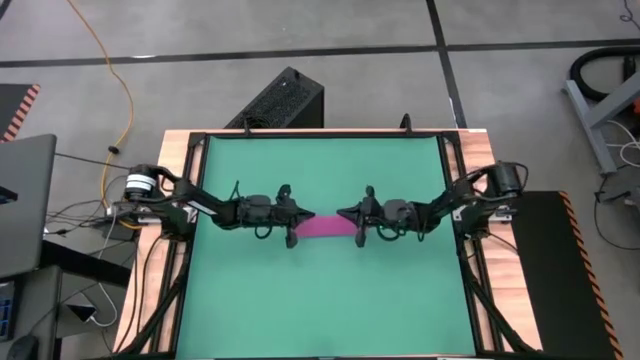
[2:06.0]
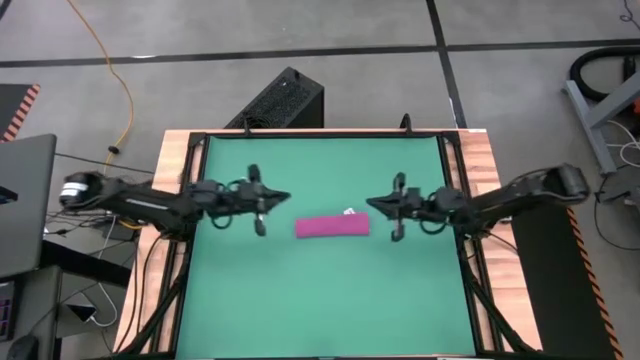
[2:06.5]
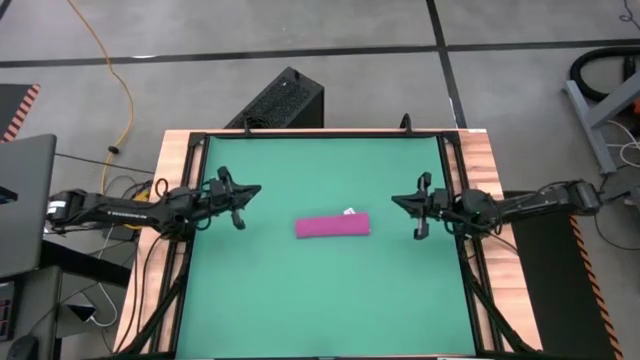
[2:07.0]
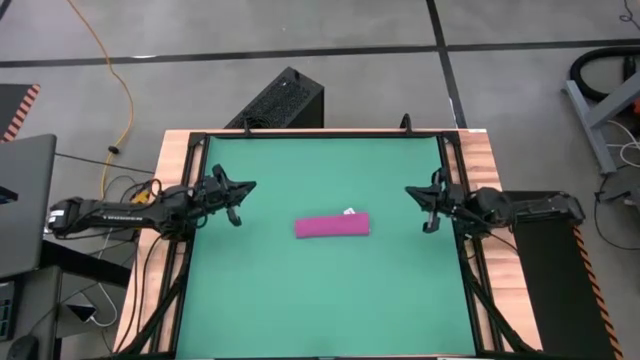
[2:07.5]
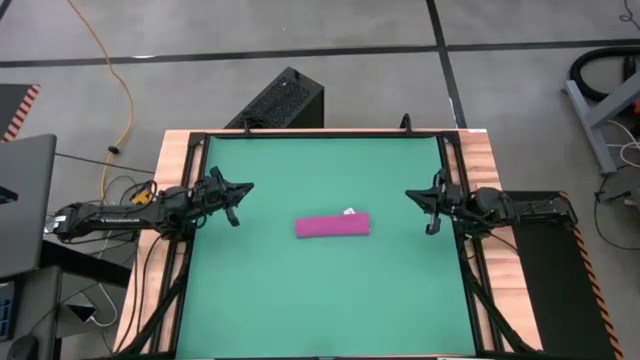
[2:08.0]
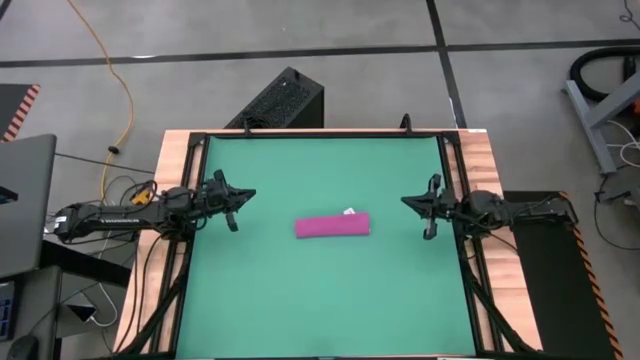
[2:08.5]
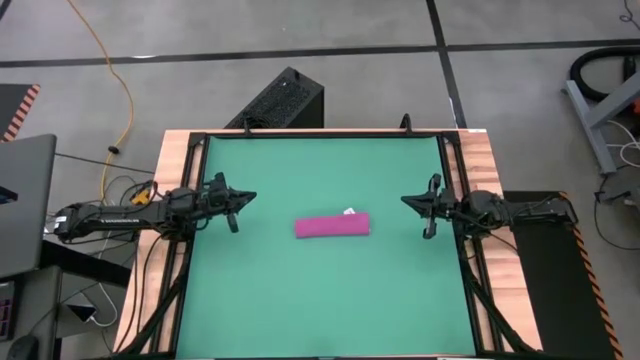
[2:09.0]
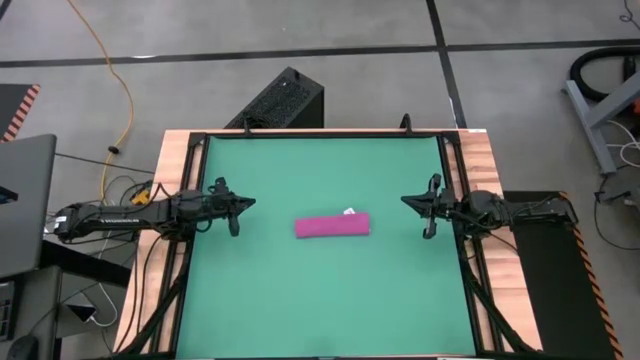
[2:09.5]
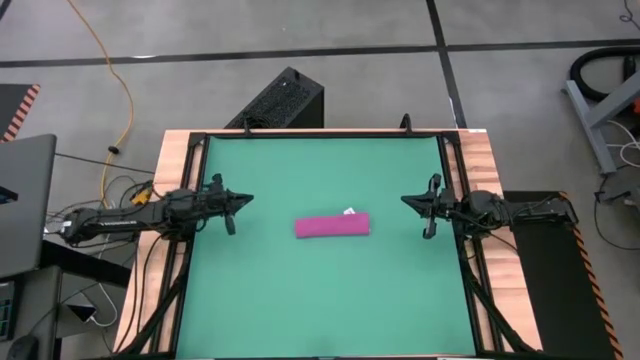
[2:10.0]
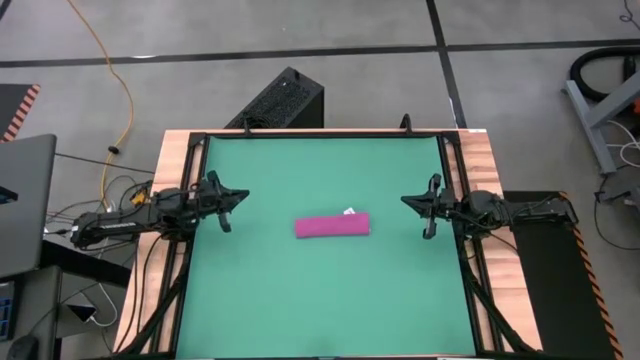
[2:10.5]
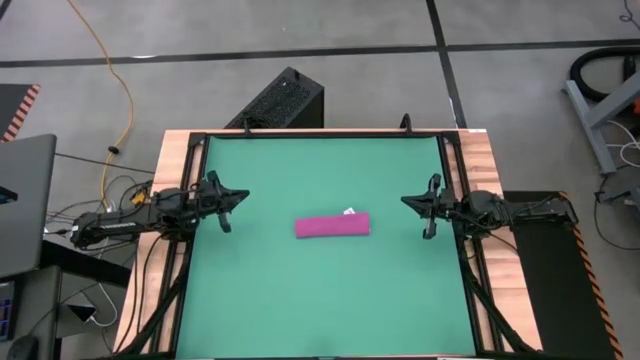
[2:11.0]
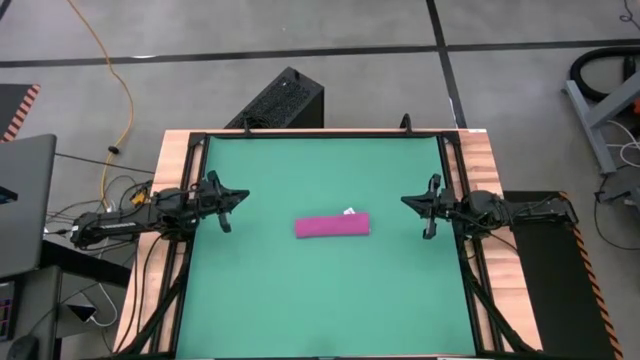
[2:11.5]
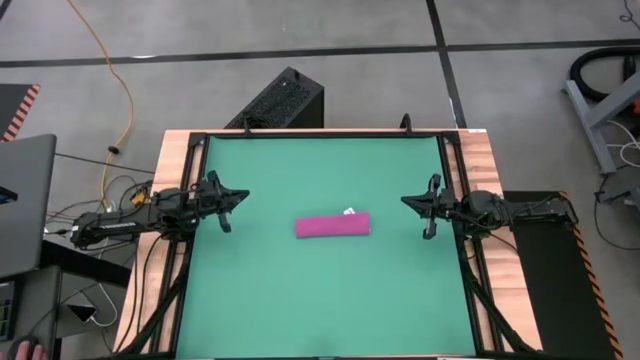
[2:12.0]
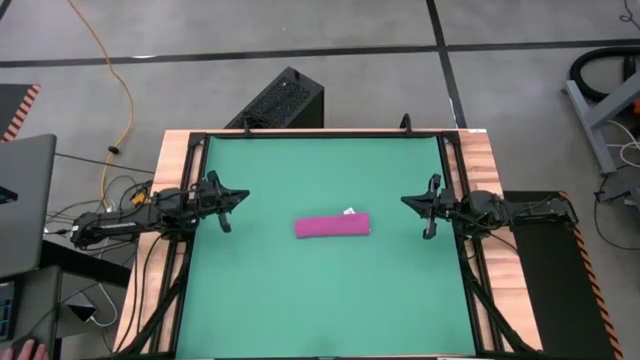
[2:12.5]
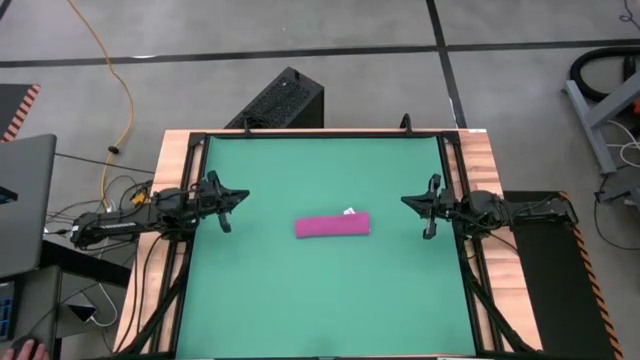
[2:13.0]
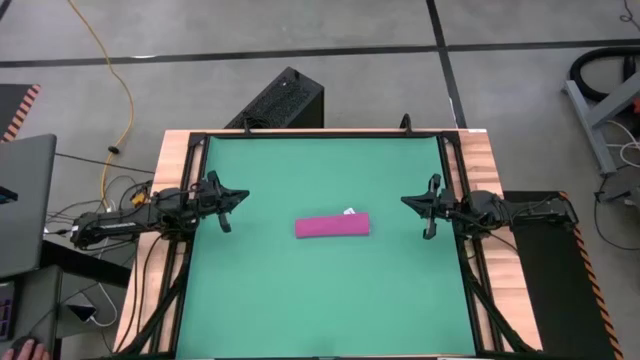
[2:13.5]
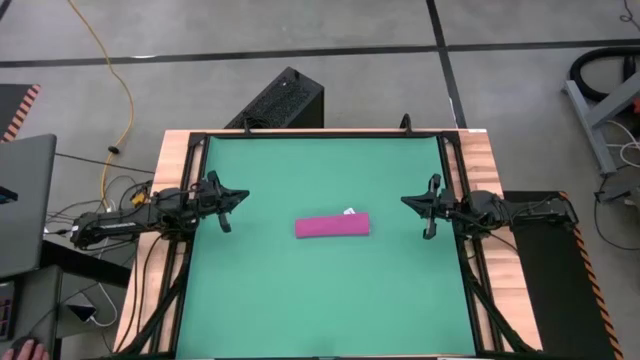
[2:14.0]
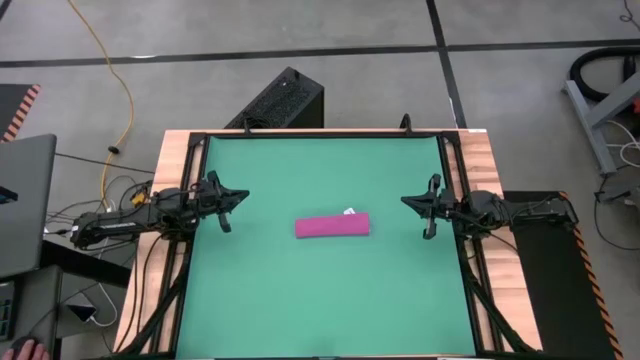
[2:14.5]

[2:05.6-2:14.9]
Task: Roll towel into tight, uniform cylinder
Return to Home Position

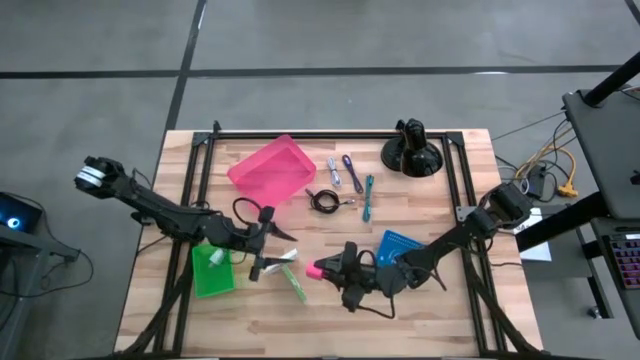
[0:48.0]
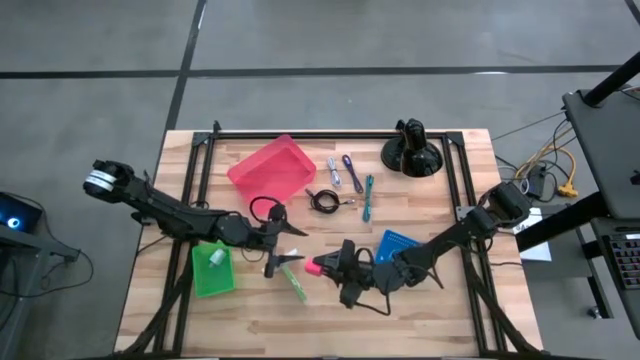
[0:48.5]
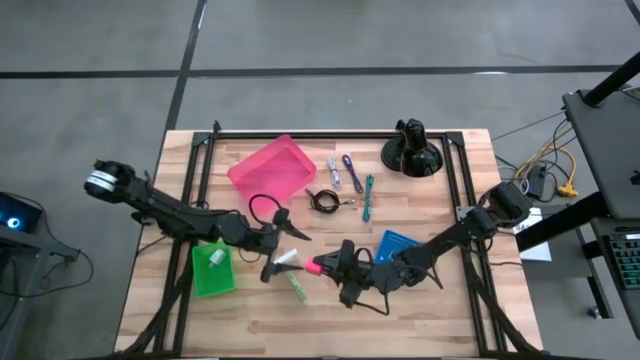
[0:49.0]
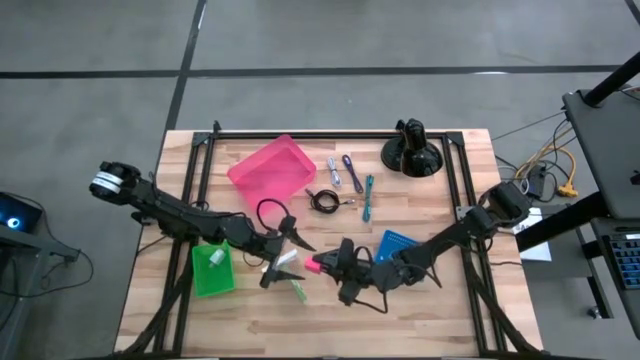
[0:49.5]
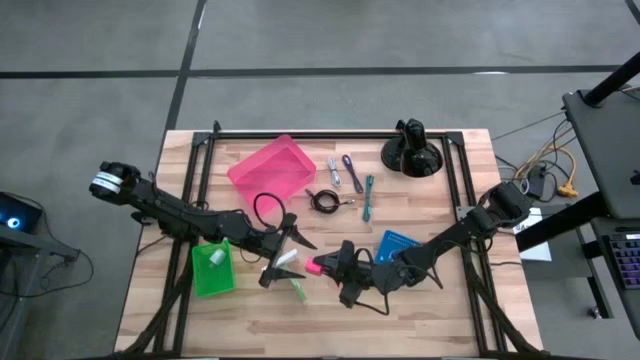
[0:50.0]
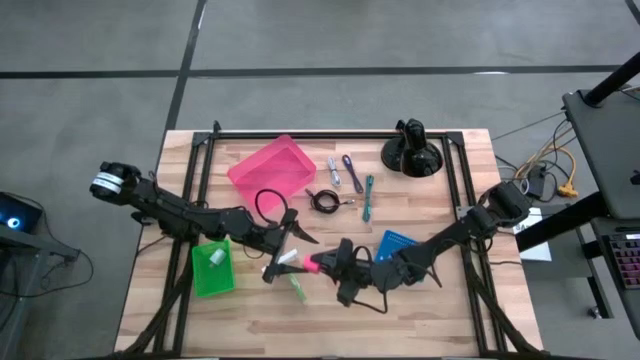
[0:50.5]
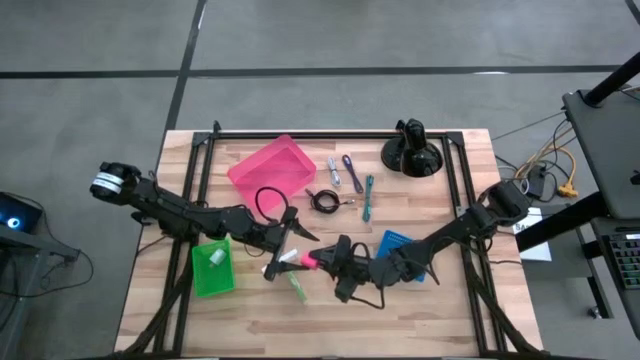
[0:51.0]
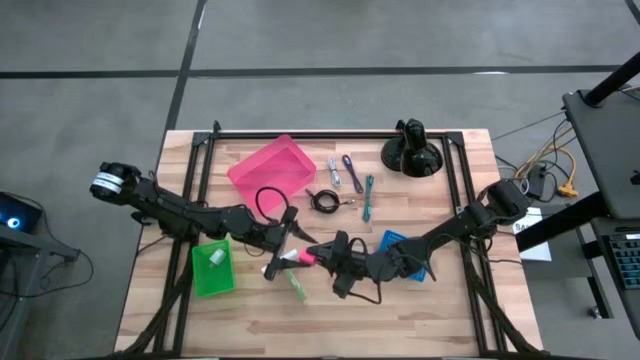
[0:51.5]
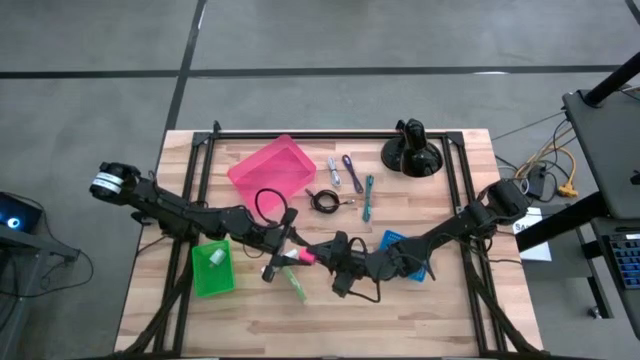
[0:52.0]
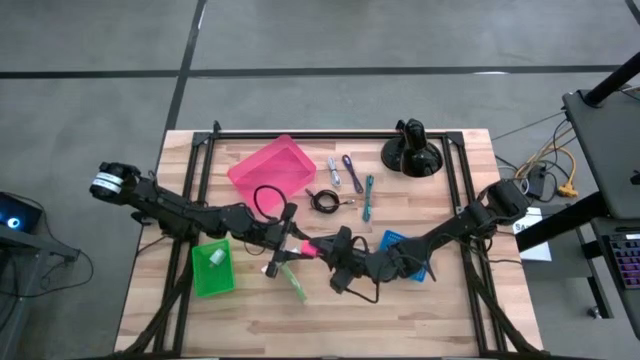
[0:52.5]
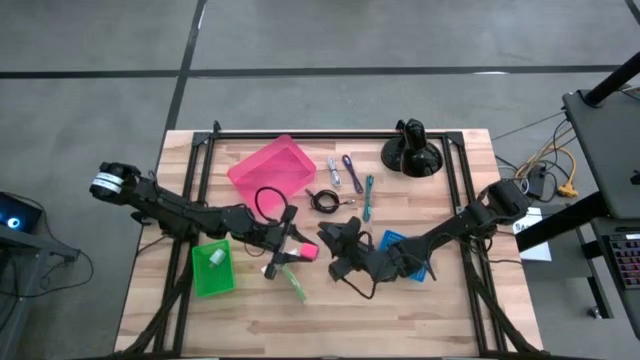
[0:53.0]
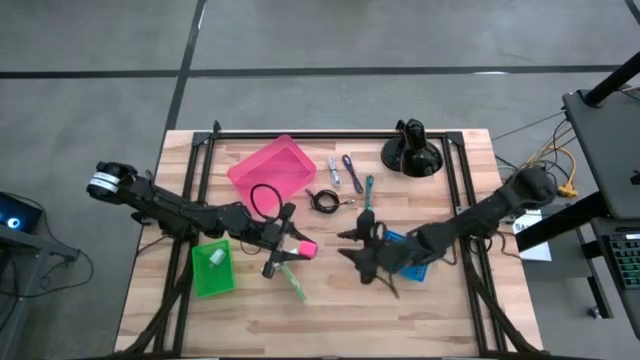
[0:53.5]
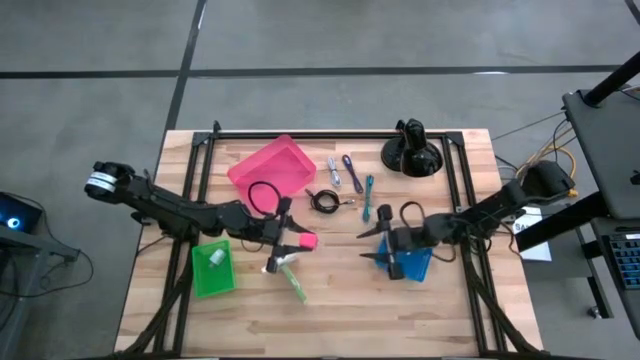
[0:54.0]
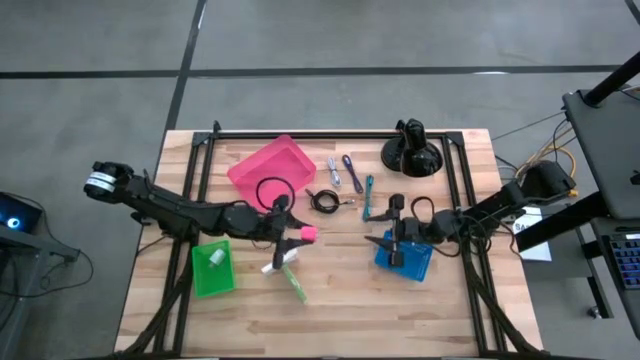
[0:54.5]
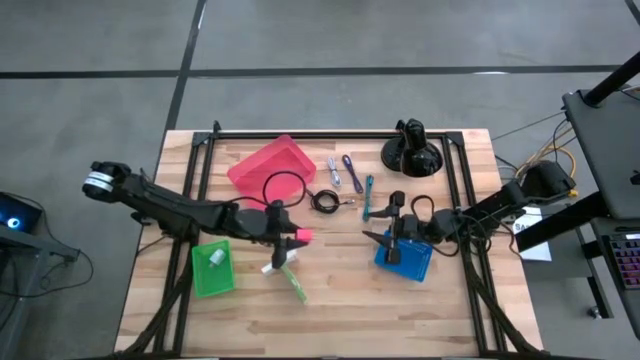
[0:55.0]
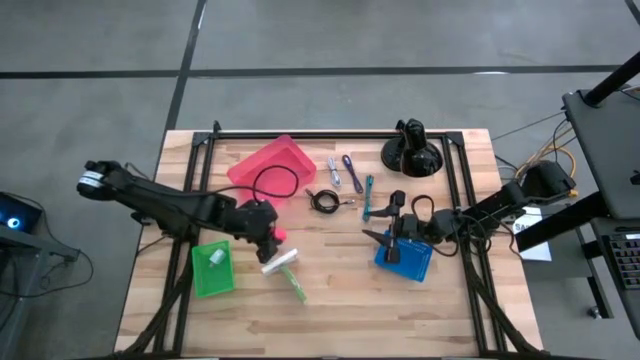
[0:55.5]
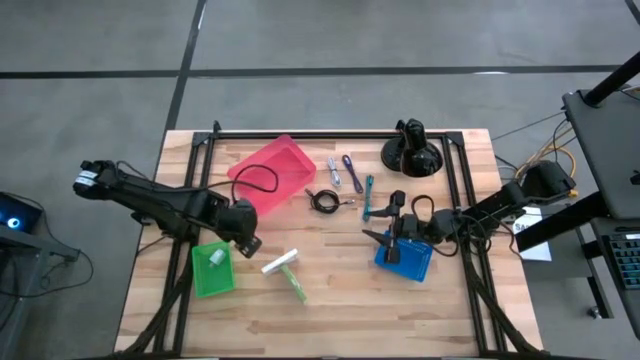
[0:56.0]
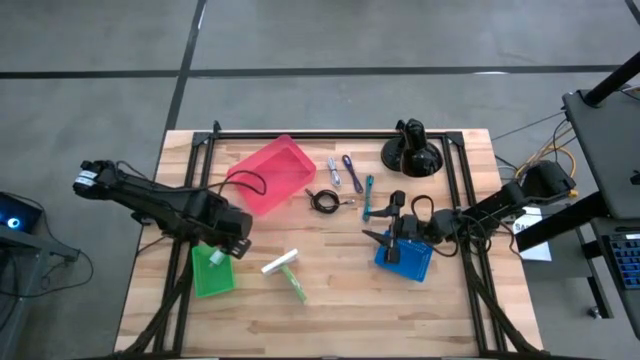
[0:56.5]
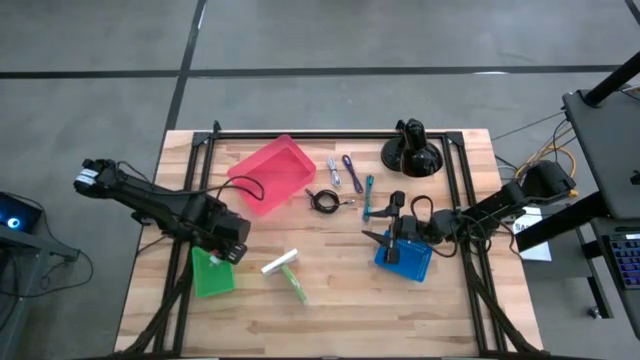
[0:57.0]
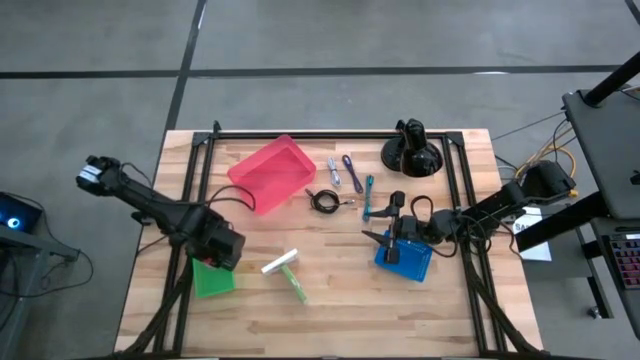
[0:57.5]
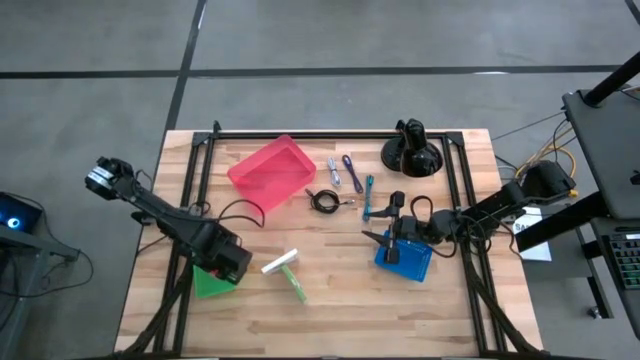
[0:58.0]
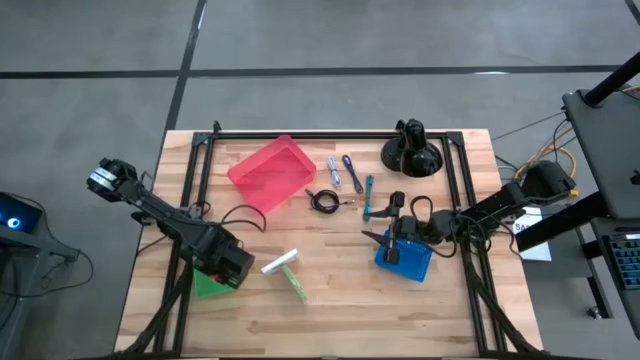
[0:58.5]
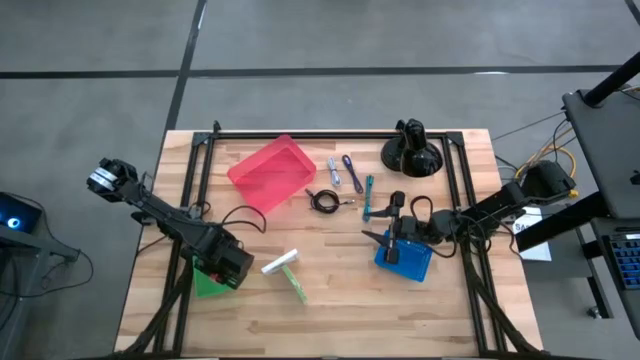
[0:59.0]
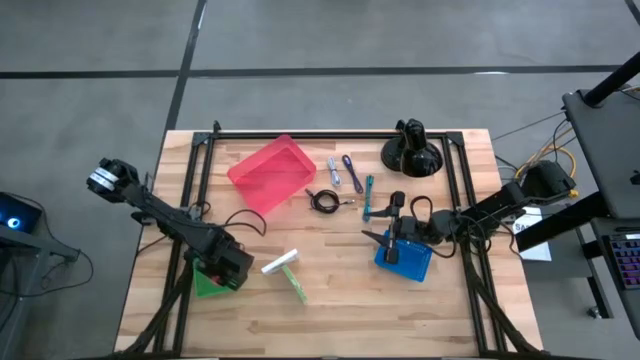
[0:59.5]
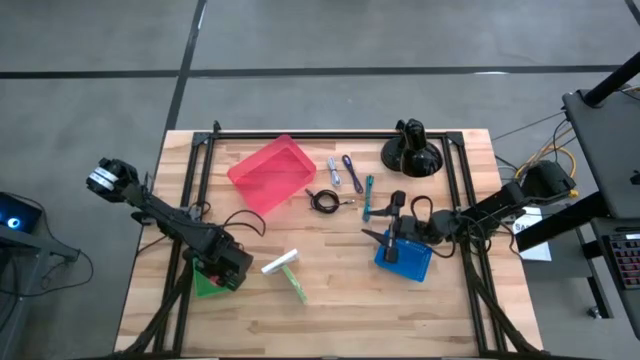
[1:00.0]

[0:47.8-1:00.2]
Task: Pick and place items into bin
Put the pink charger adapter into the green bin
